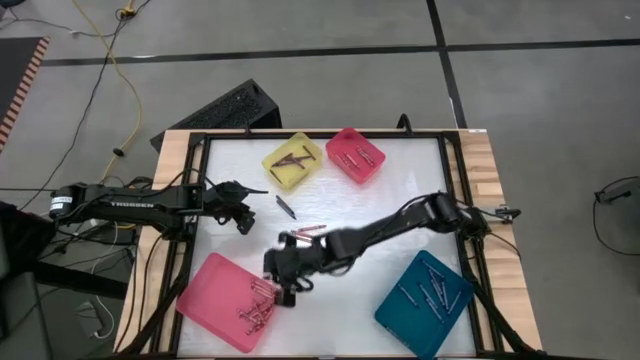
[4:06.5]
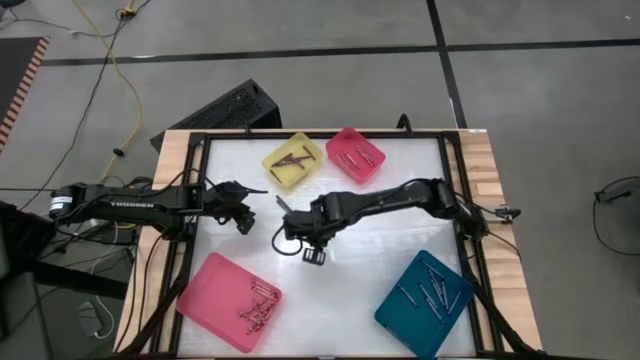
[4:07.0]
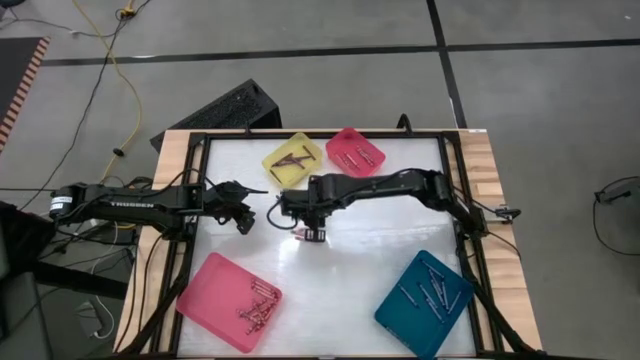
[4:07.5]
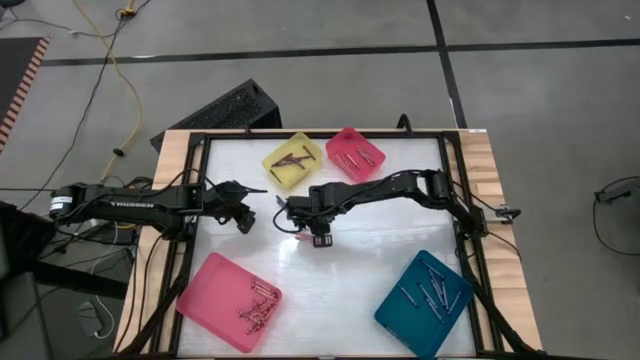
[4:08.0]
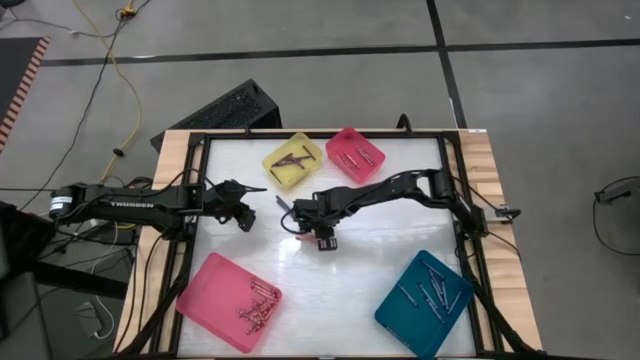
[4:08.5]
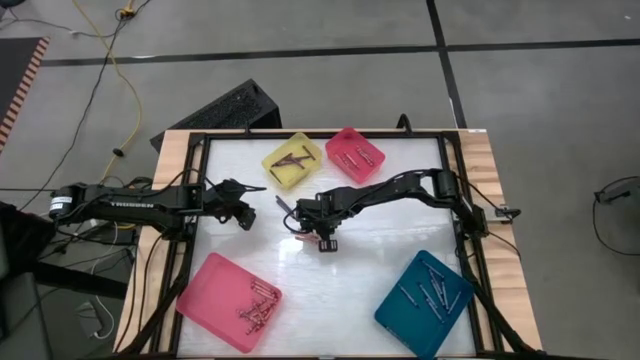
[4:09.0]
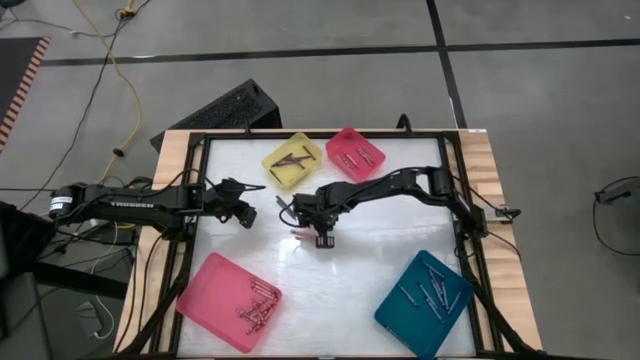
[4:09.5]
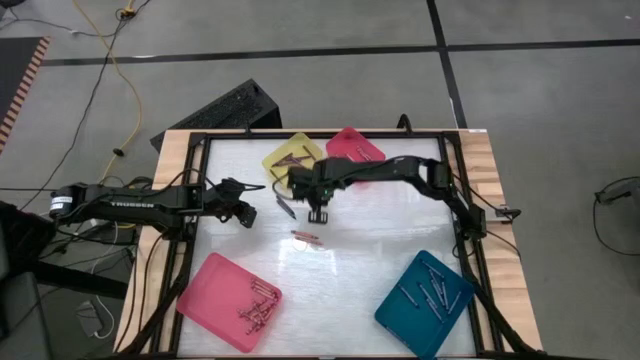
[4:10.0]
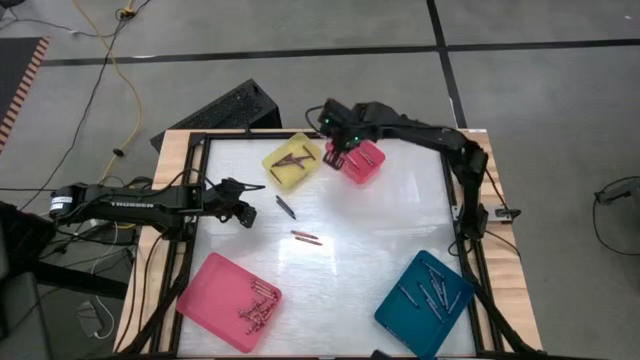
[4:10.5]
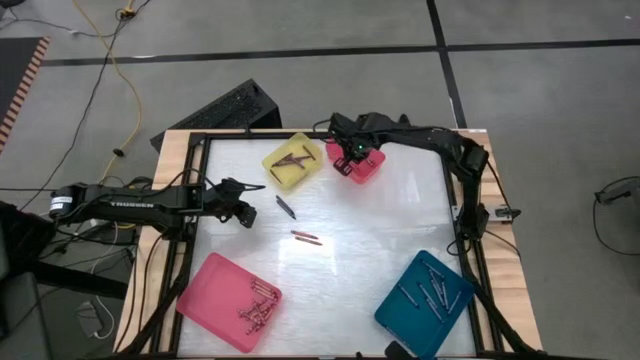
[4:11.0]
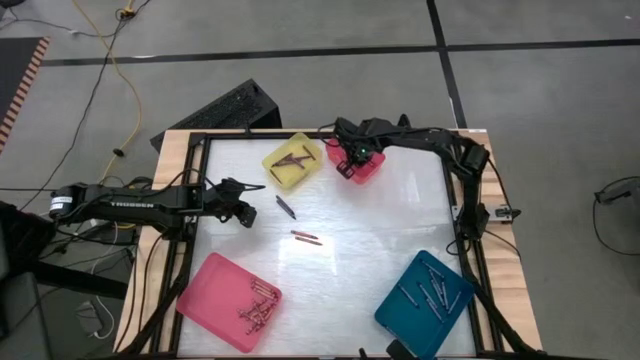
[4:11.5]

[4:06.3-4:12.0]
Task: Sort crayons
Put the pink crayon into the red bin

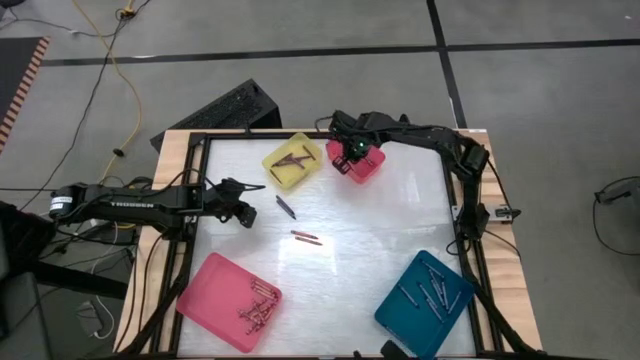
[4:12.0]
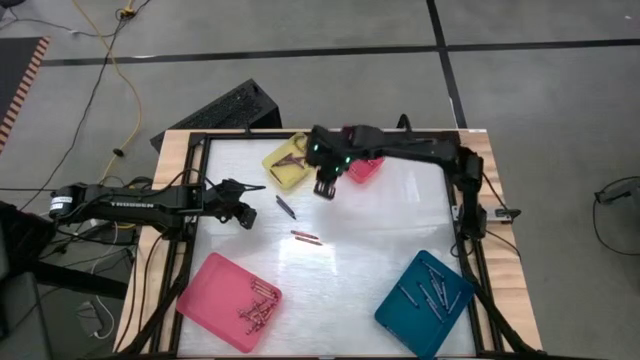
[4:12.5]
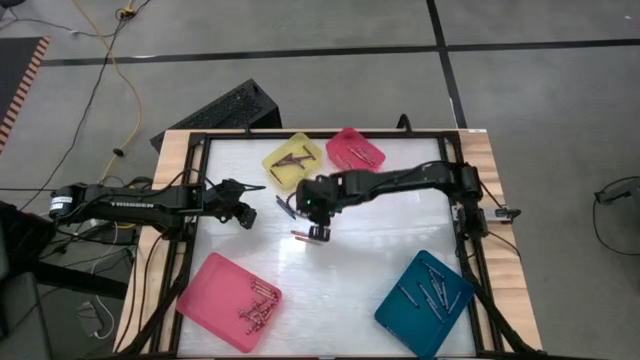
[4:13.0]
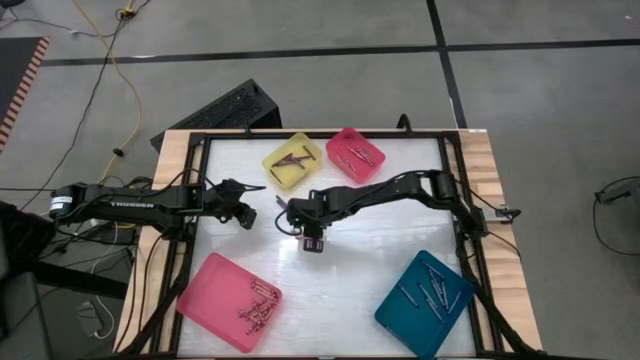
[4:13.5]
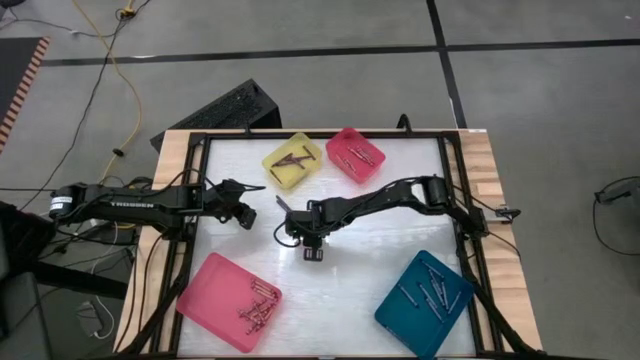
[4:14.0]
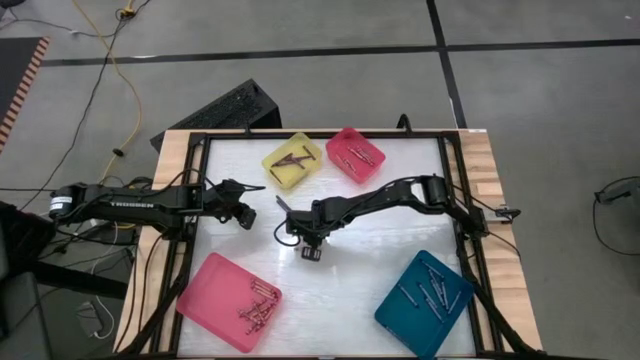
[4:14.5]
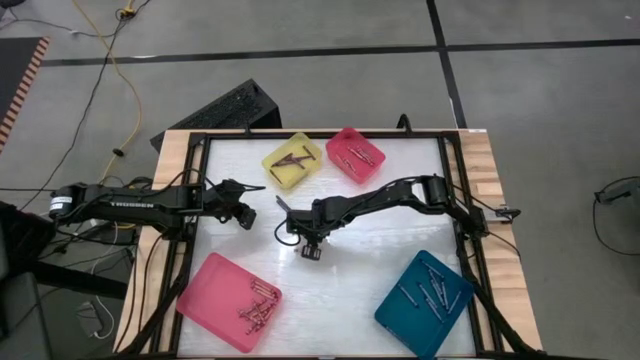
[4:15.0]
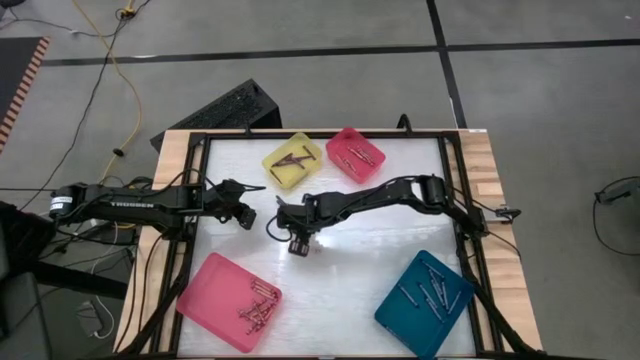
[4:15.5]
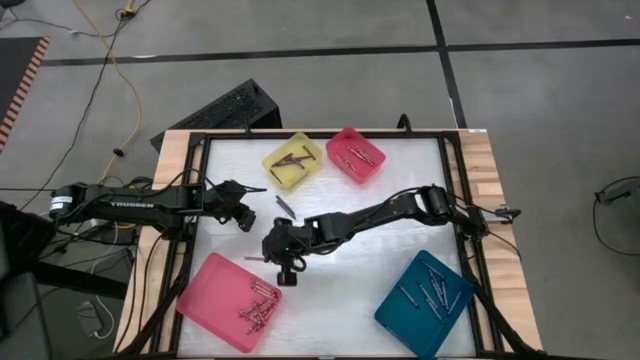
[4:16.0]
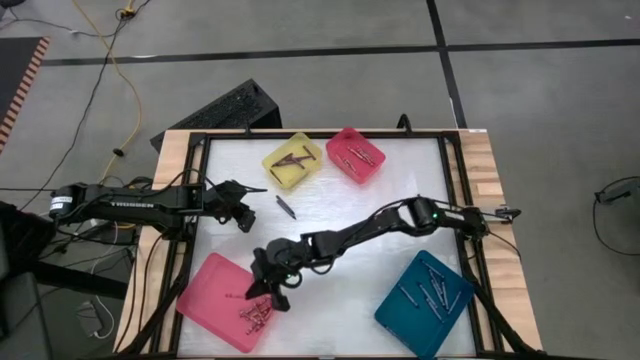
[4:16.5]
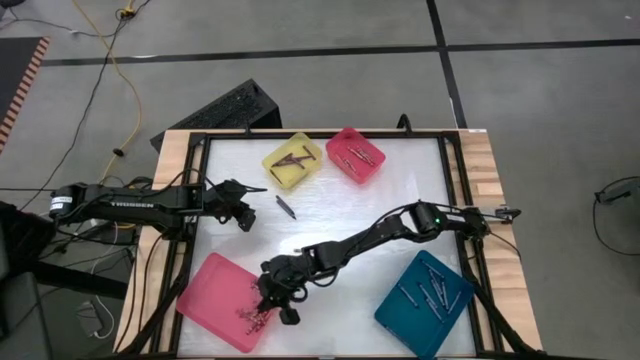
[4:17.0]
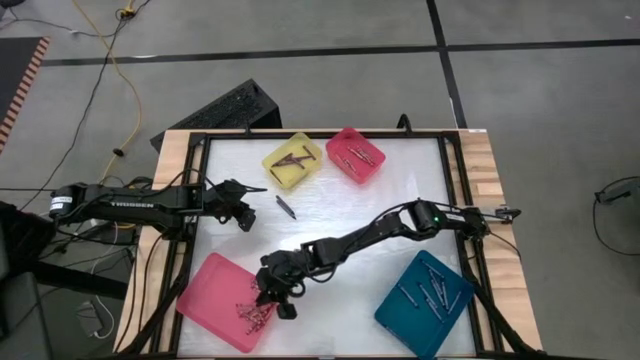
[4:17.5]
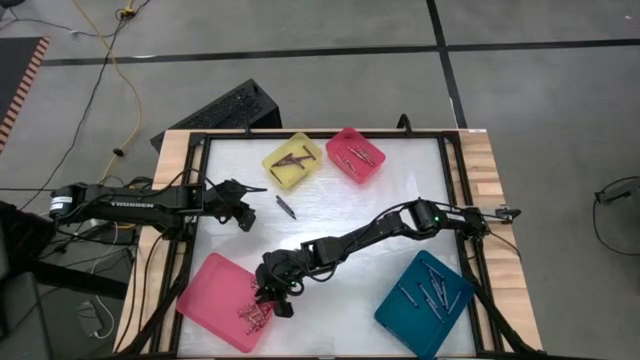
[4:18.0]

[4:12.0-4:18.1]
Put the red crayon into the pink bin

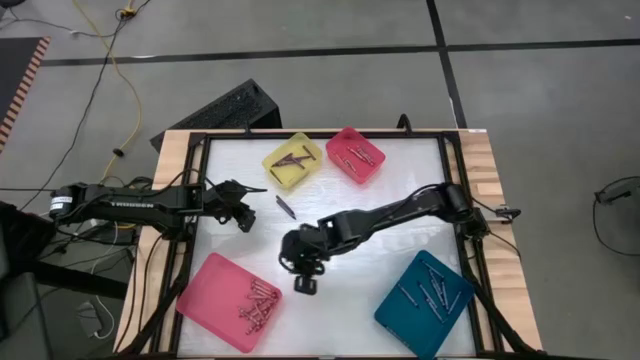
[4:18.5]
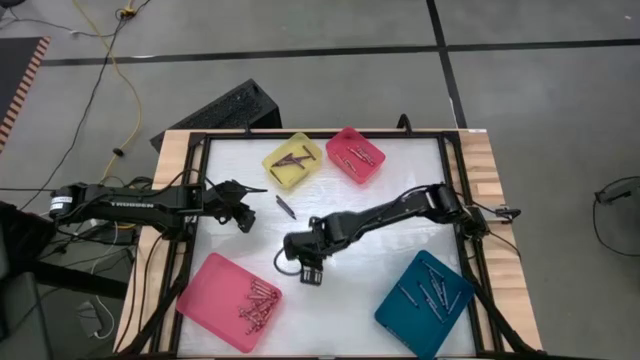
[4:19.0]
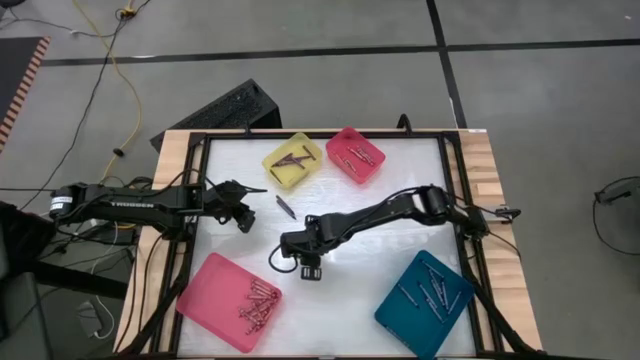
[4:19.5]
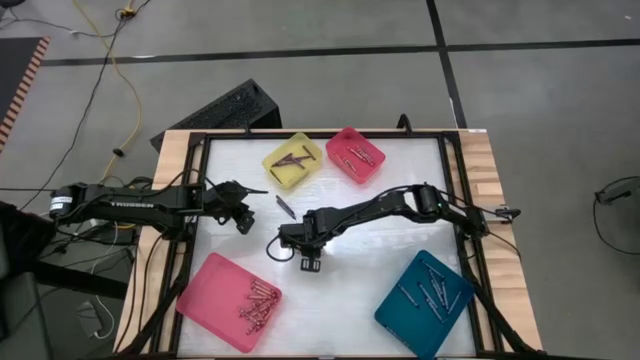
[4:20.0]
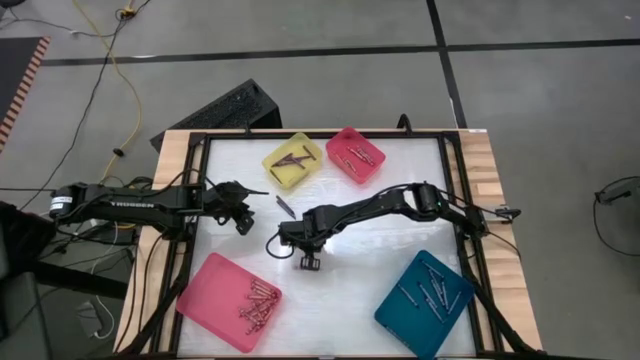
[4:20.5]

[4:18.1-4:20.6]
Put the pink crayon into the red bin

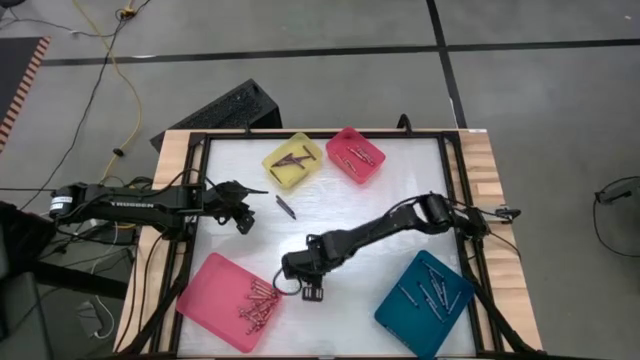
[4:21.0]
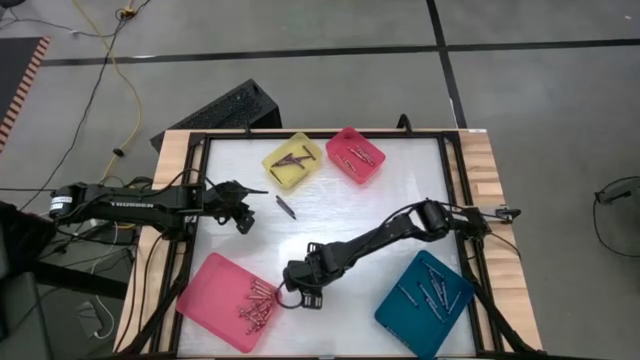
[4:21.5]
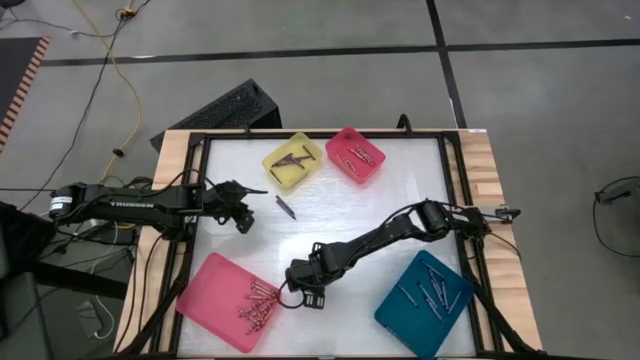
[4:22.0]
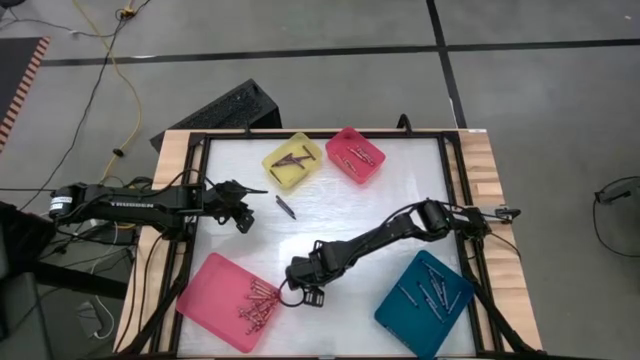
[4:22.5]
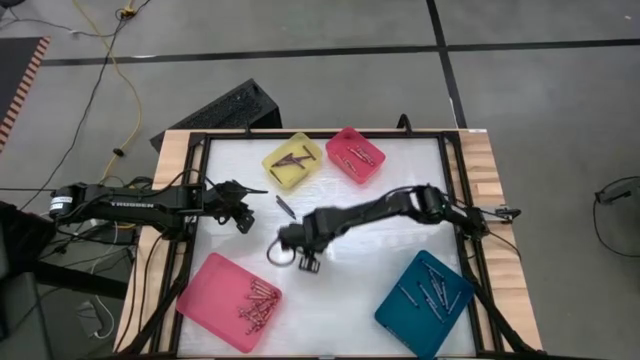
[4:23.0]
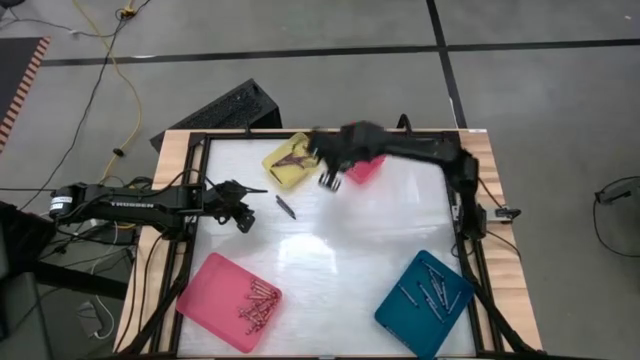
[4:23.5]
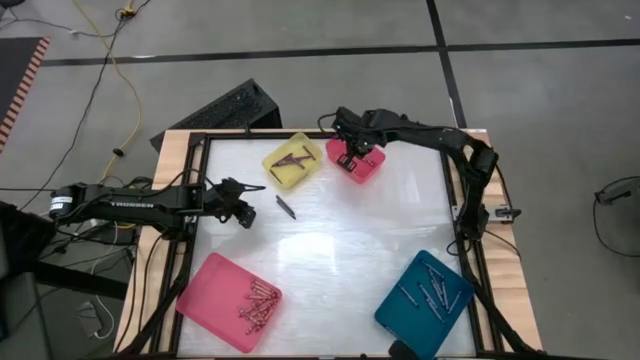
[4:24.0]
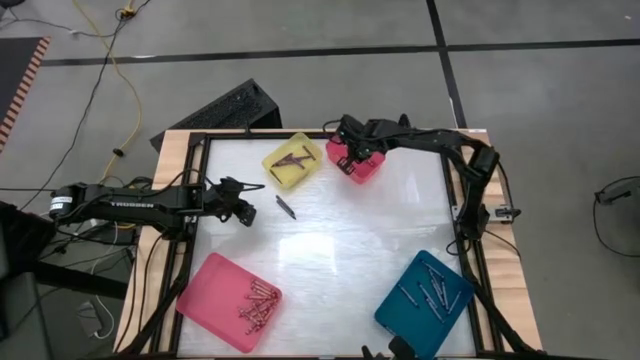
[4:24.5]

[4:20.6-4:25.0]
Put the pink crayon into the red bin

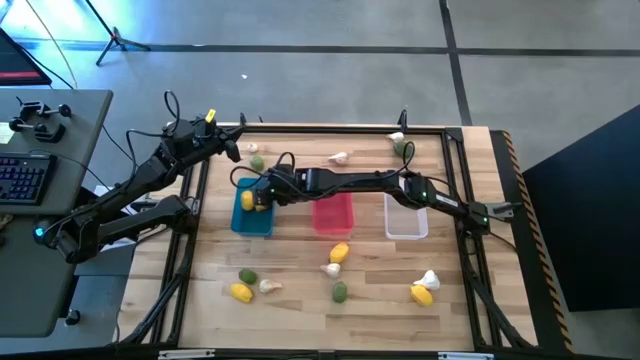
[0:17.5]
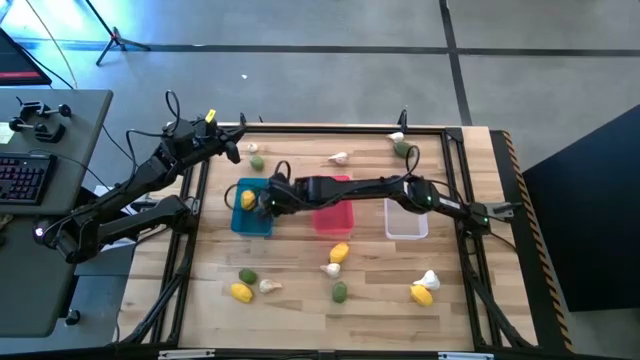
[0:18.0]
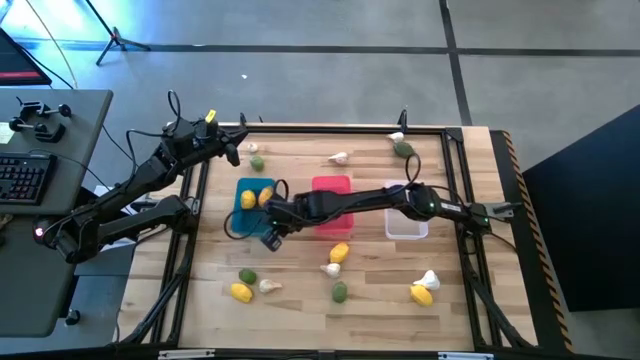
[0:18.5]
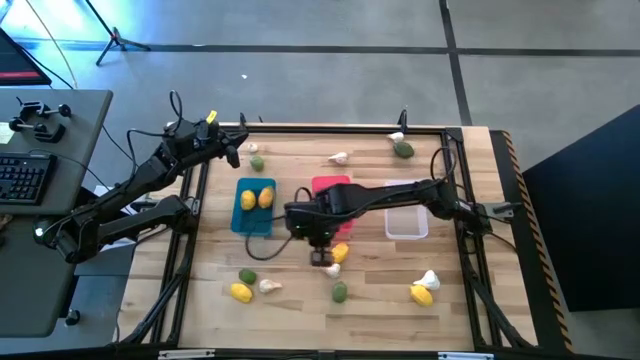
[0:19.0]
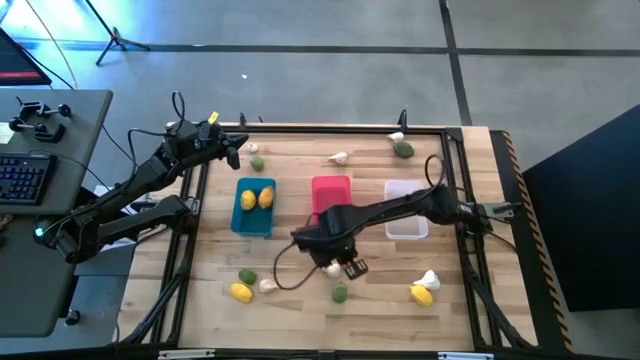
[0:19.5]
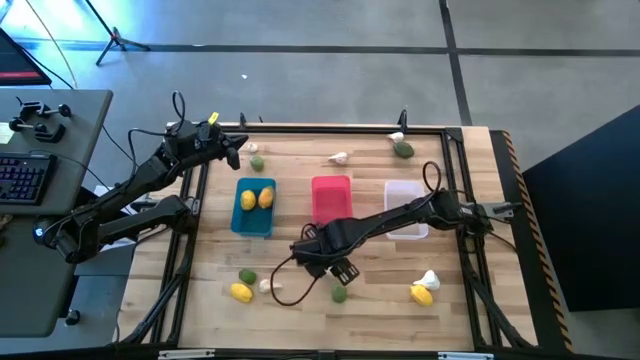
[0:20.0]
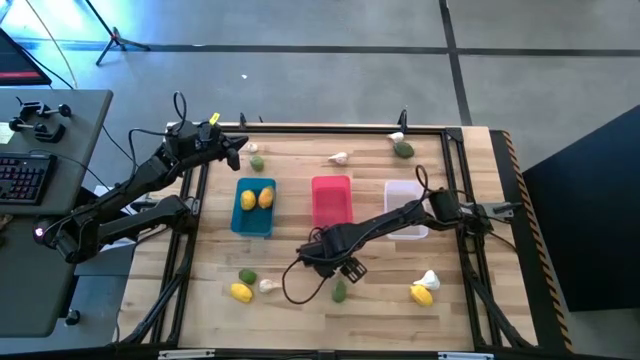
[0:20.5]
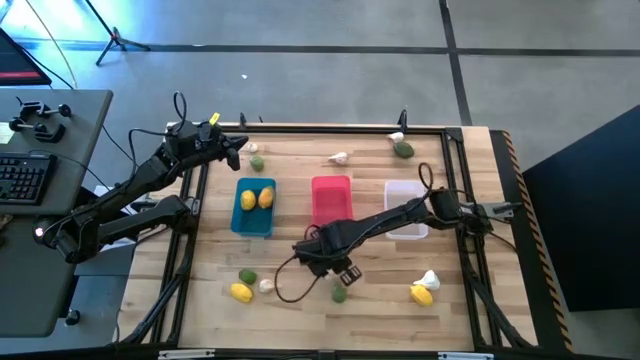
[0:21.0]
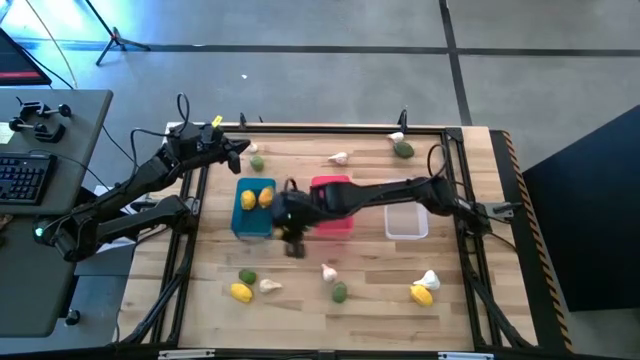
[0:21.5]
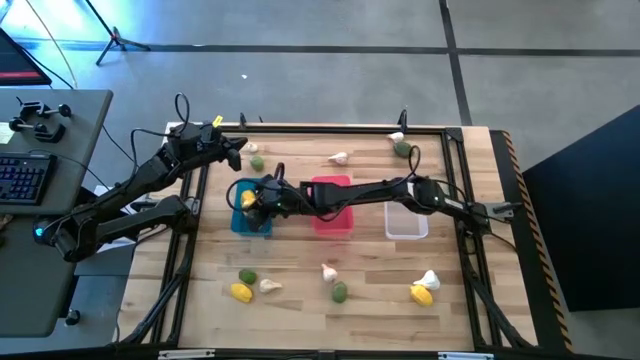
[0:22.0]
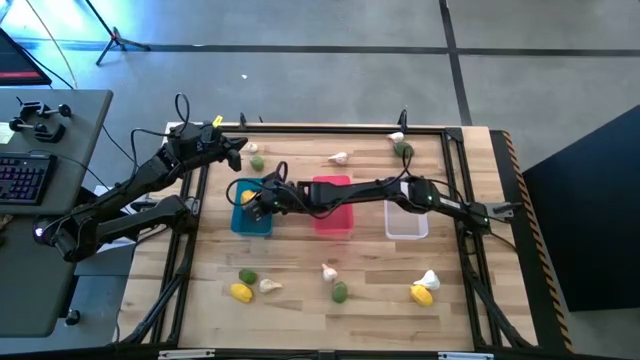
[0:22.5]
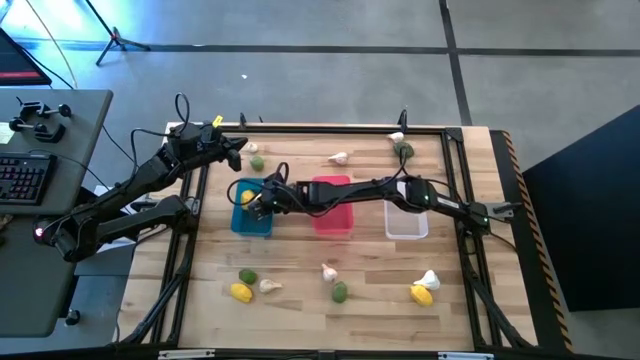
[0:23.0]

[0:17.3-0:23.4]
Task: Sort produce into baskets
Put the middle yellow lemon into the blue bin
